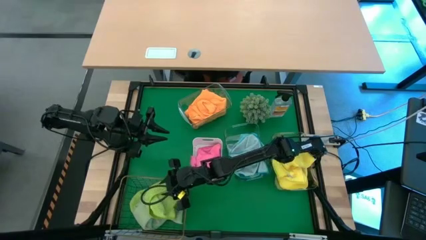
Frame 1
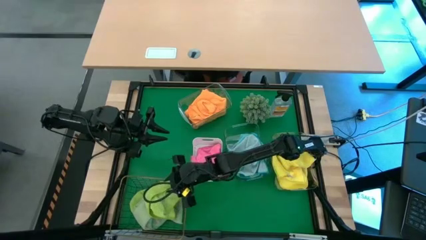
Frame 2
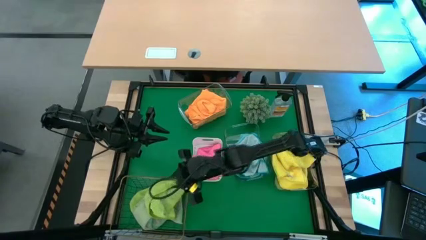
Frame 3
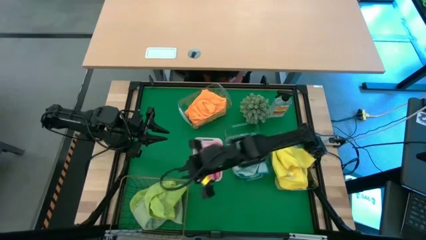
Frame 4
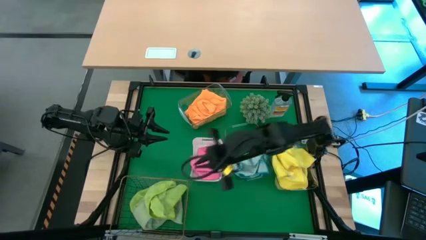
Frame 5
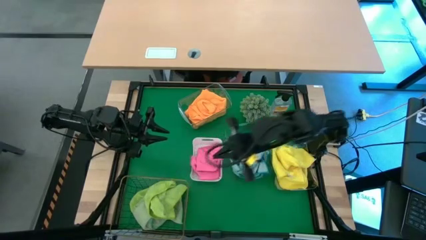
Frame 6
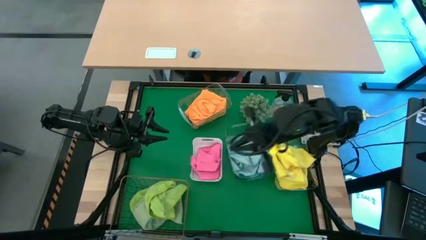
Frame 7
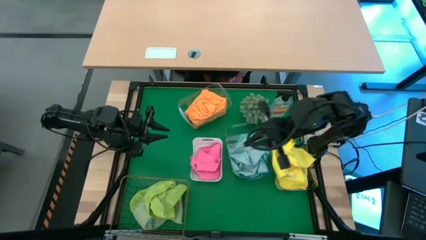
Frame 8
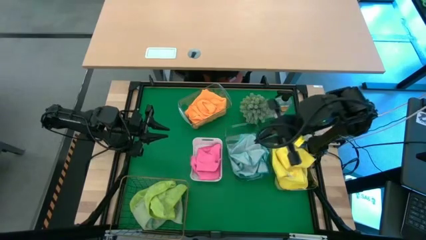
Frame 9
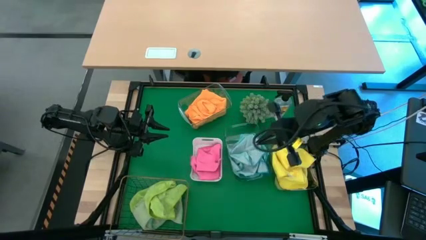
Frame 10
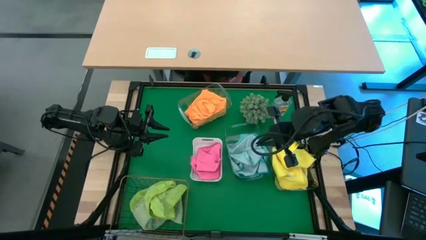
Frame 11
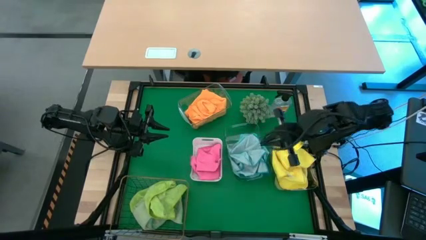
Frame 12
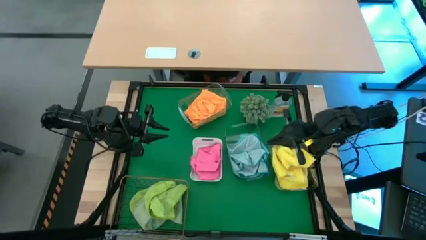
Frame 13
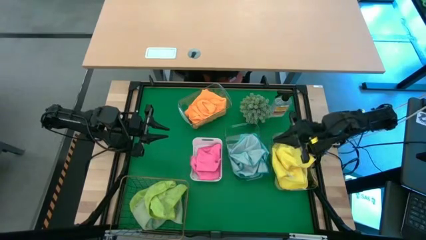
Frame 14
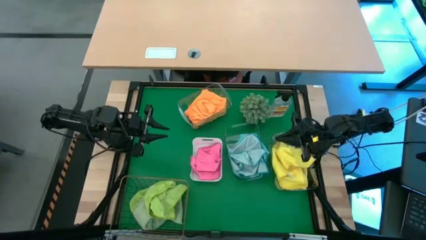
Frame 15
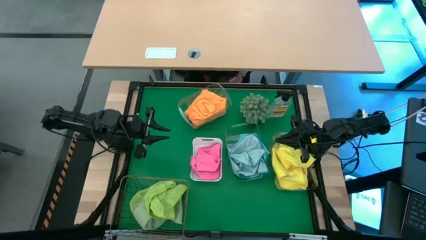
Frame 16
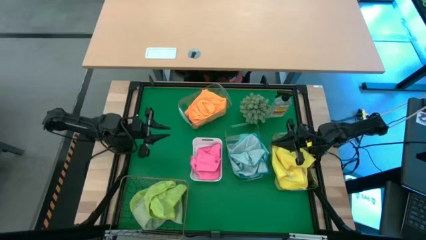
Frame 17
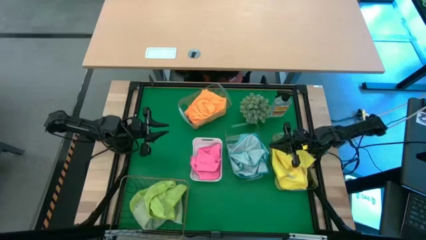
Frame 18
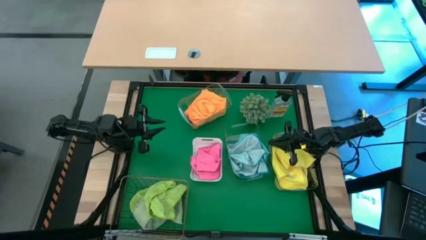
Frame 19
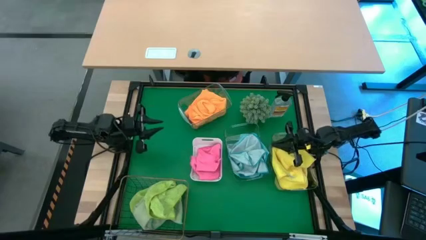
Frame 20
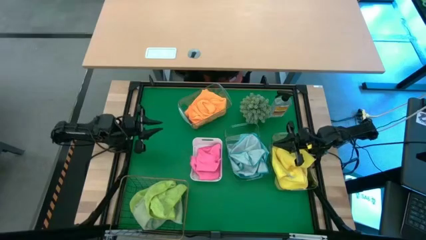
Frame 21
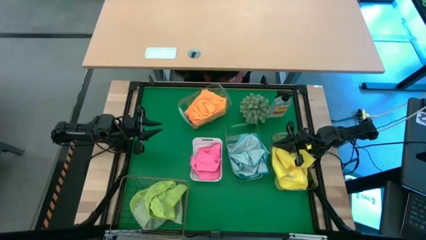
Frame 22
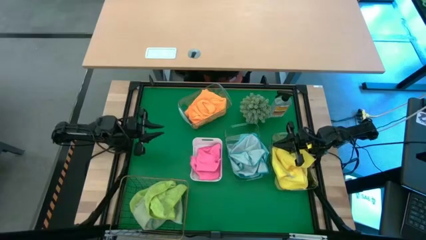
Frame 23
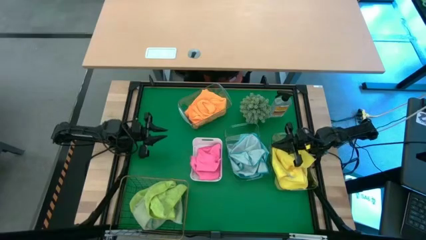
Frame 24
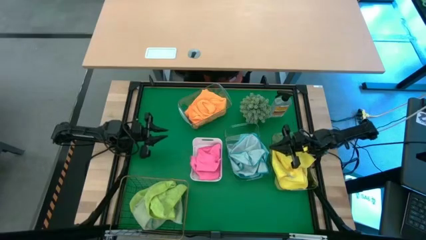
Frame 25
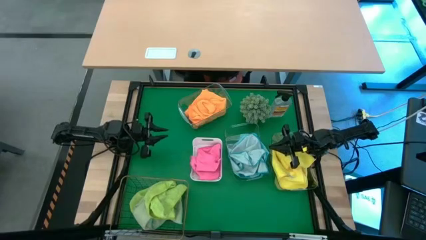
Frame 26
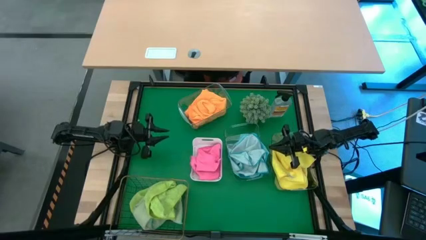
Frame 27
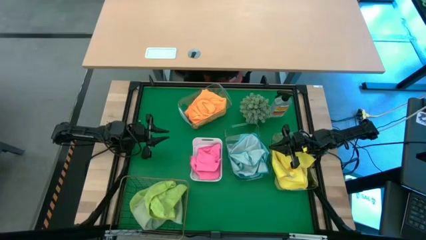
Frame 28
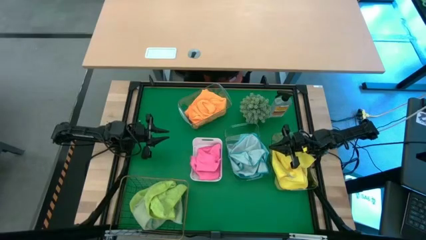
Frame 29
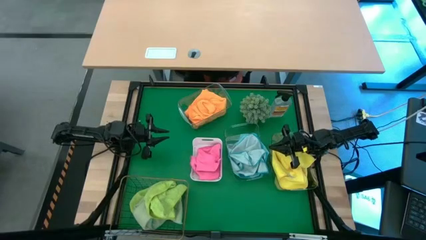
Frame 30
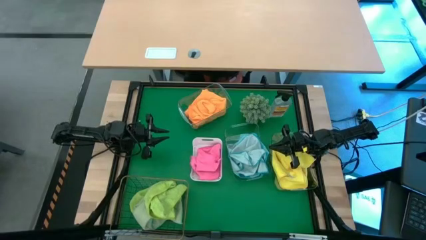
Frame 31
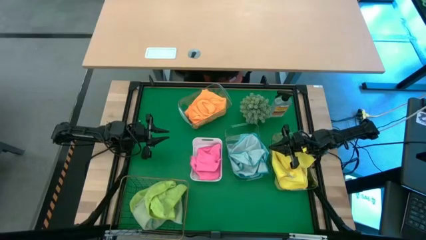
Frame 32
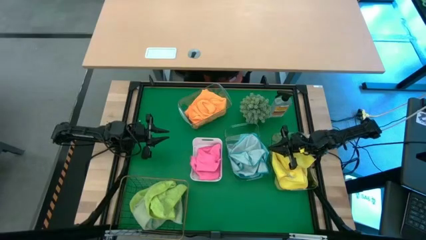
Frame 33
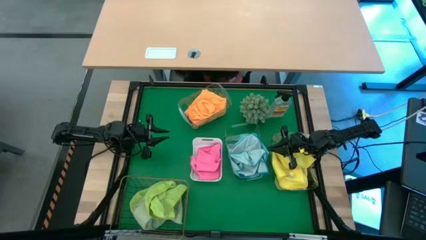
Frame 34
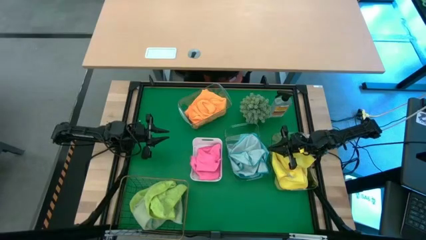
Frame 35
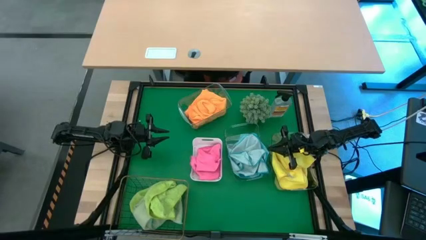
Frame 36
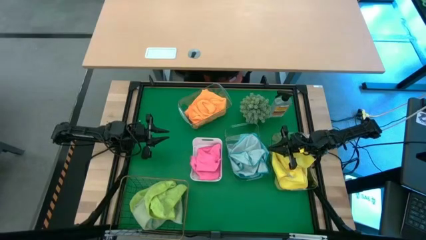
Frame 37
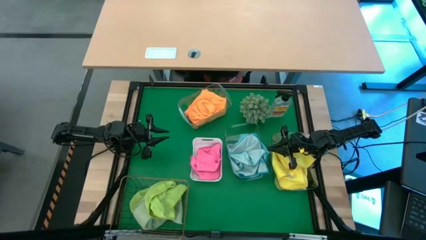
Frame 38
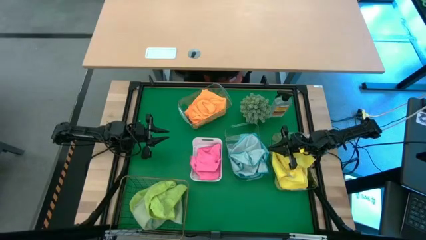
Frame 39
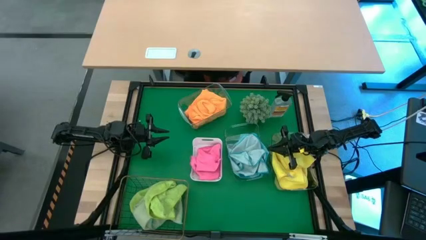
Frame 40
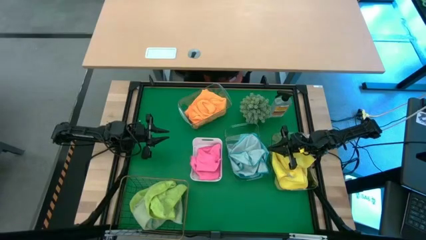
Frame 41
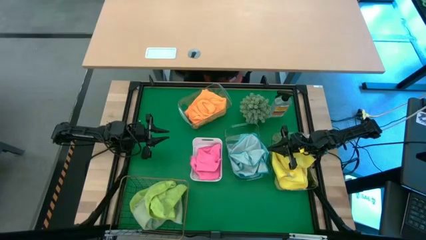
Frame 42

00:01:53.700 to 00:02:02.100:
Task: Sort microfiber towel by color & place in baskets
Return to Home Position

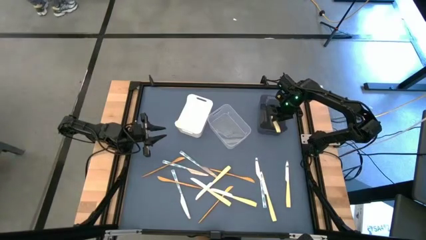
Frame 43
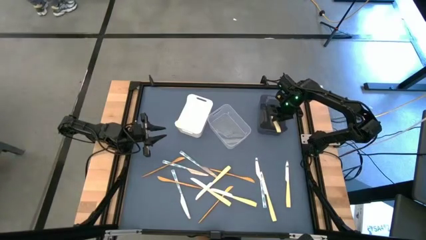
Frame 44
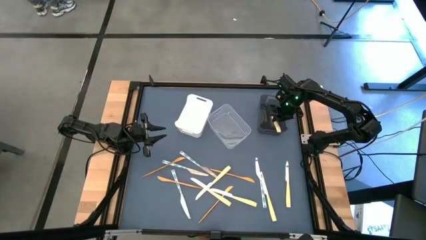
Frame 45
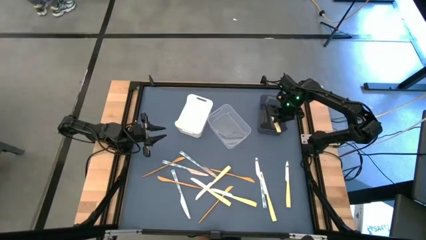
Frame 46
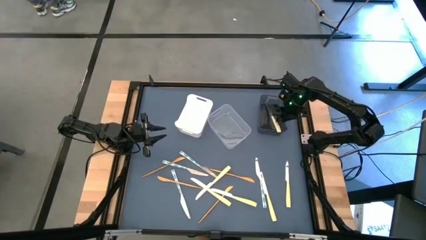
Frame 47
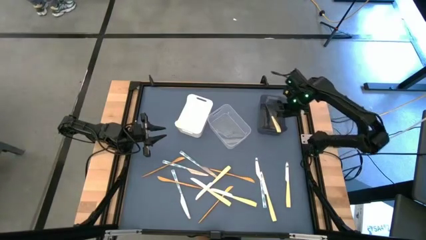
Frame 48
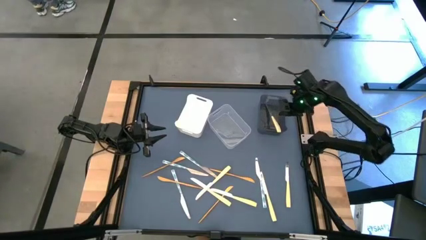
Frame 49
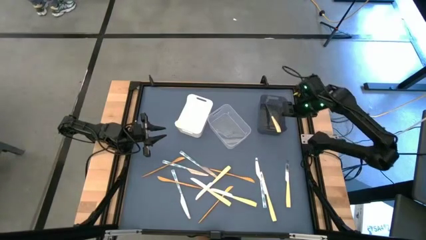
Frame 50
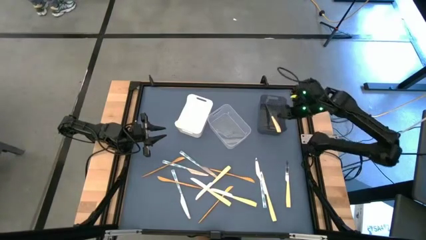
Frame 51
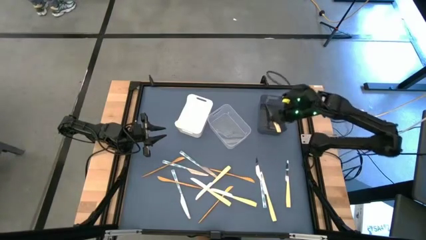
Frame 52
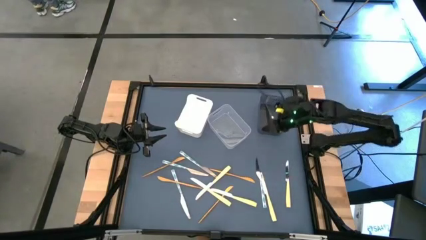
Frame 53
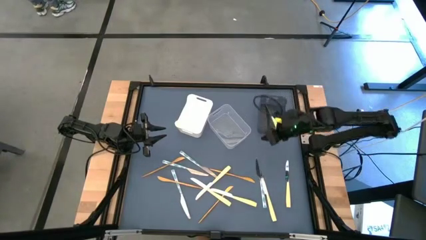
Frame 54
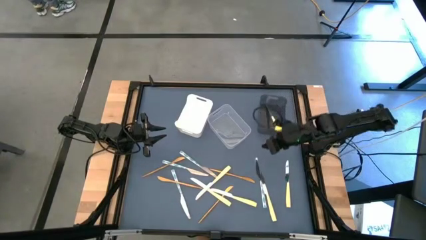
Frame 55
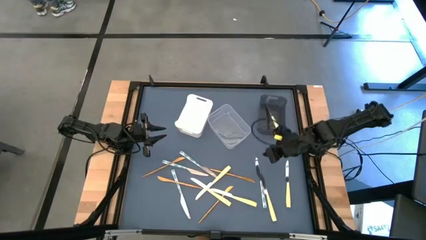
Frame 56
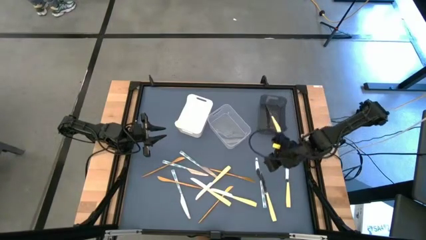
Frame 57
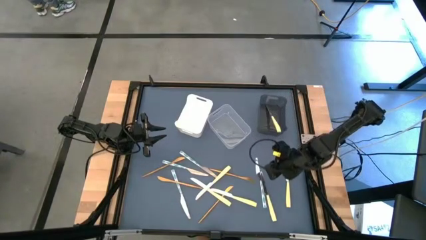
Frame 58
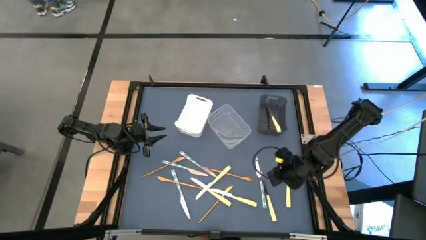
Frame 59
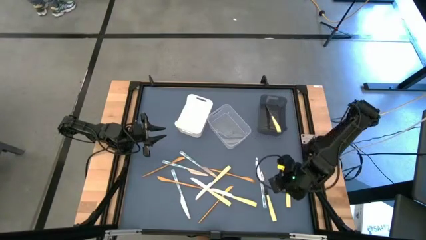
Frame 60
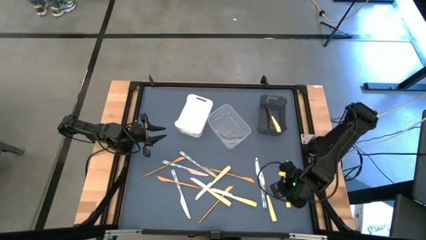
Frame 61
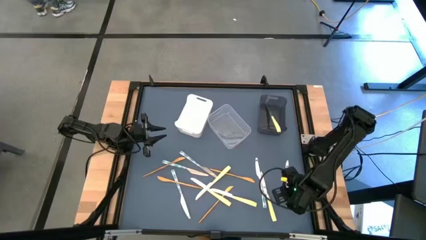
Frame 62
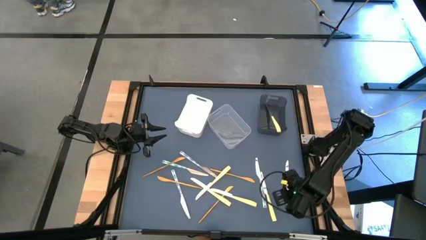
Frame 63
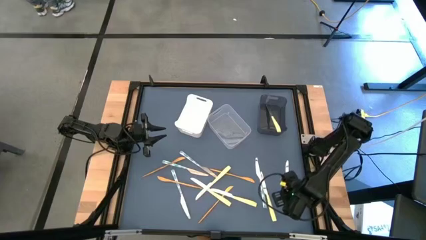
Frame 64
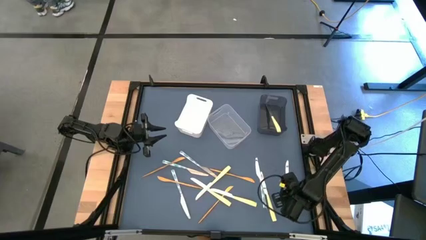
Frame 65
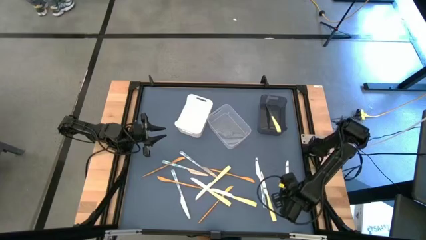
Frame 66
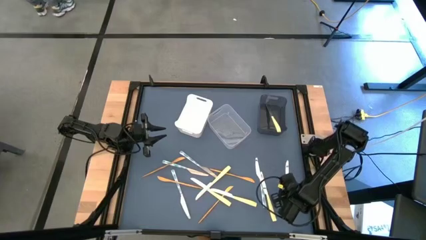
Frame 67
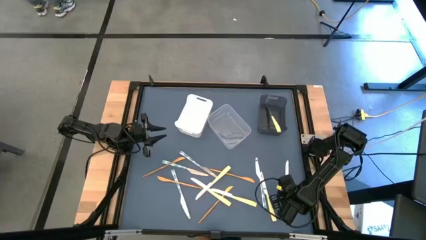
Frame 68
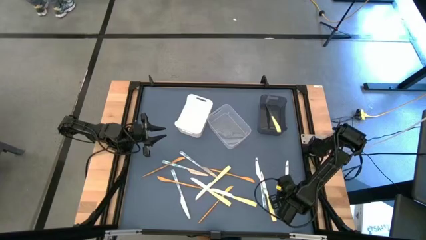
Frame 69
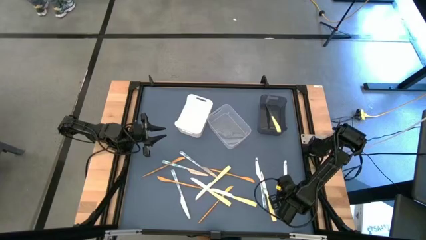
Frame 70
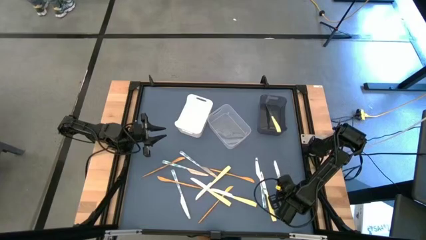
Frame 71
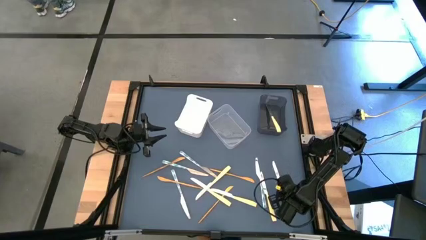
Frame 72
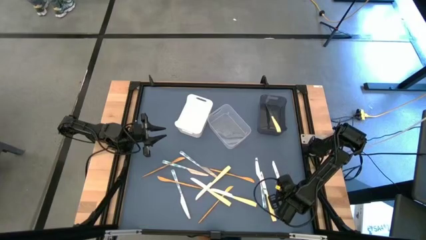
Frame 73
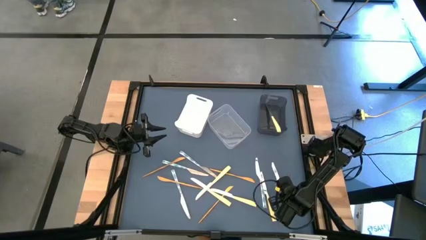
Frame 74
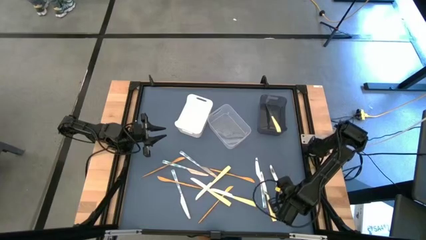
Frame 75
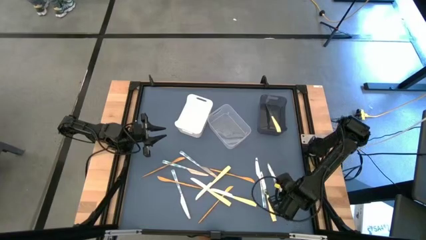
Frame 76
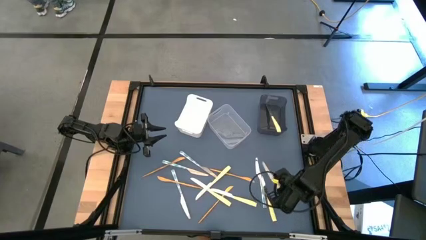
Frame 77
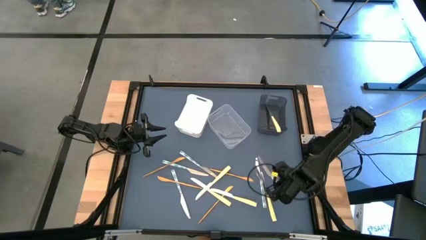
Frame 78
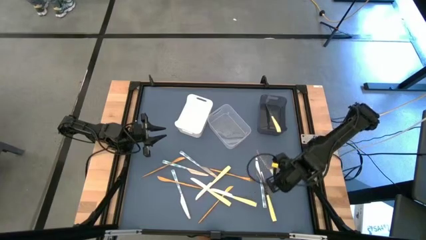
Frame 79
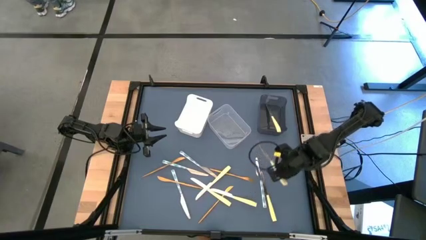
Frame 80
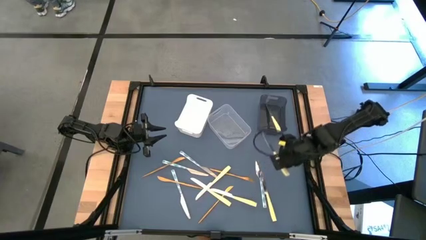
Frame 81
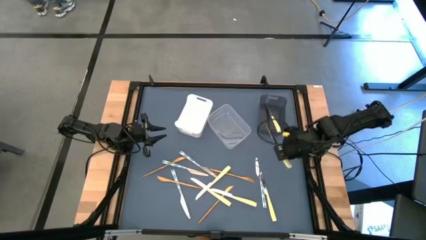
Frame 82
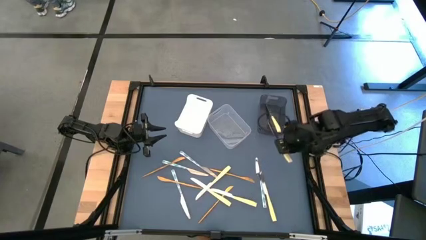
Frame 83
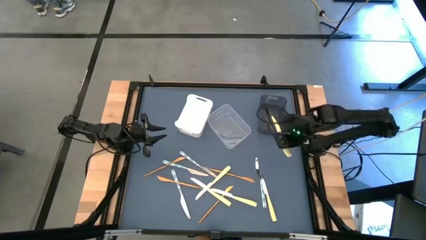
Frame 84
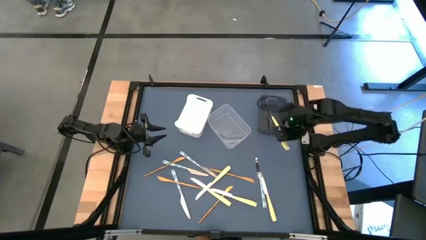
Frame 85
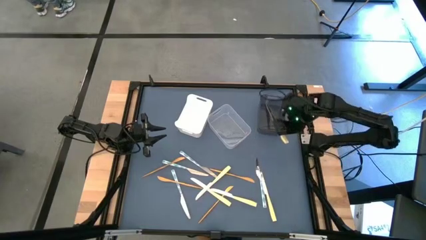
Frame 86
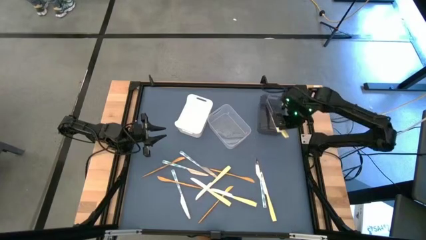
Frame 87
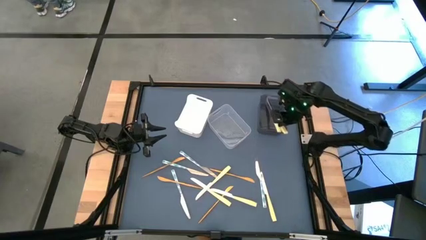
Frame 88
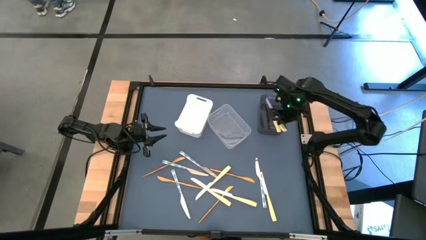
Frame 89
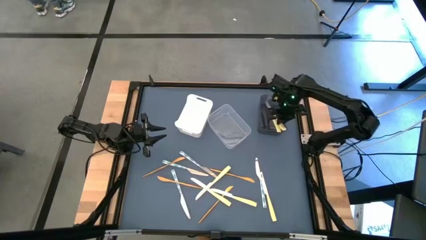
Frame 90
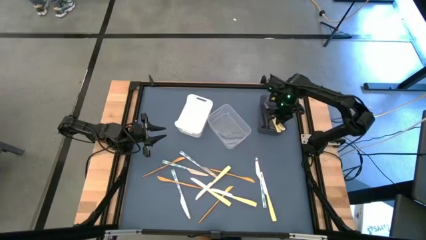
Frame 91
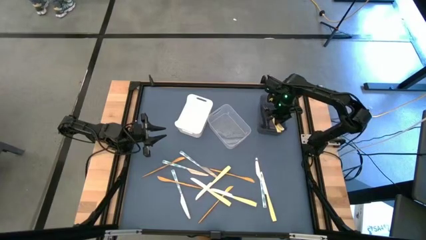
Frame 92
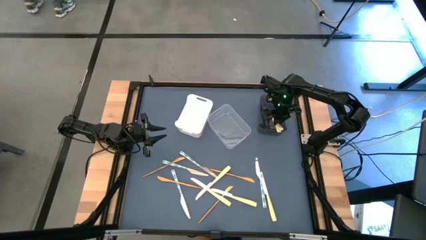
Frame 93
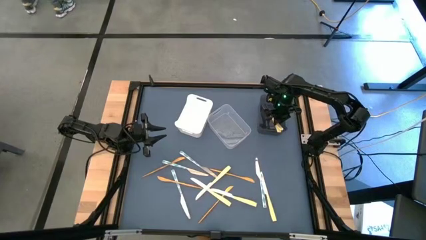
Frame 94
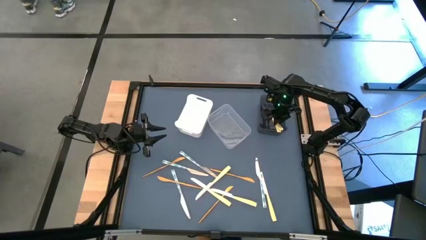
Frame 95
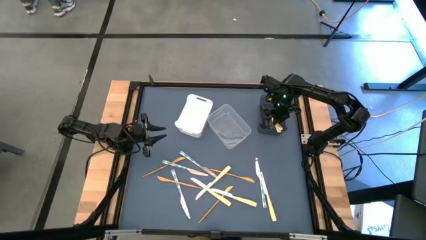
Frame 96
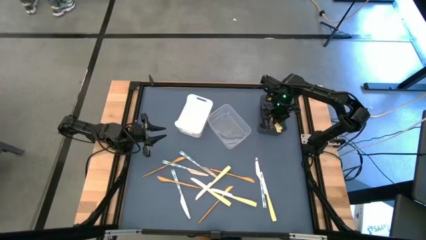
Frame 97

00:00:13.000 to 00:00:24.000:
Task: Sort silverware by color (type)
Put the yellow knife into the black bin
